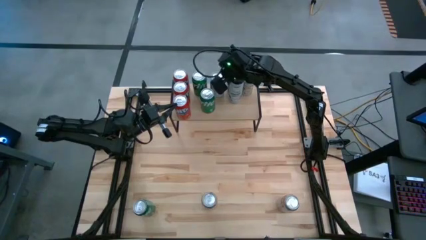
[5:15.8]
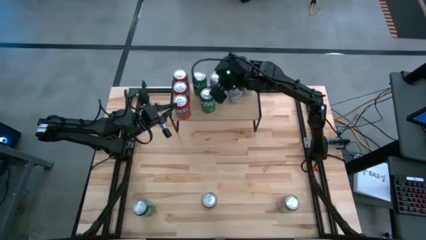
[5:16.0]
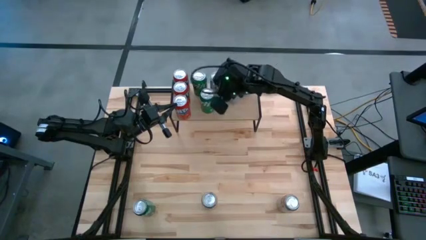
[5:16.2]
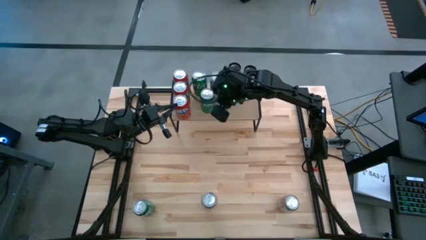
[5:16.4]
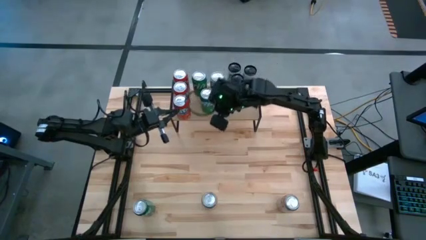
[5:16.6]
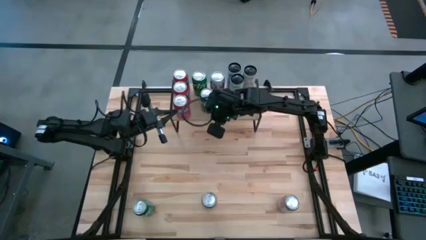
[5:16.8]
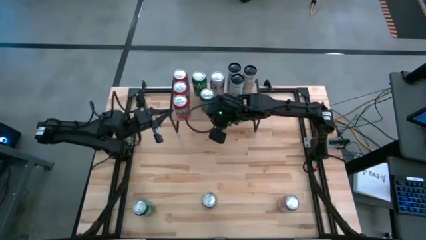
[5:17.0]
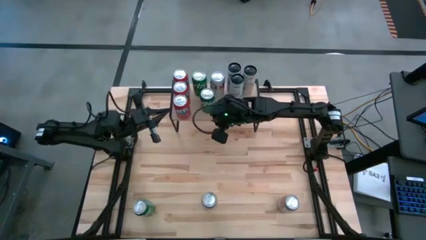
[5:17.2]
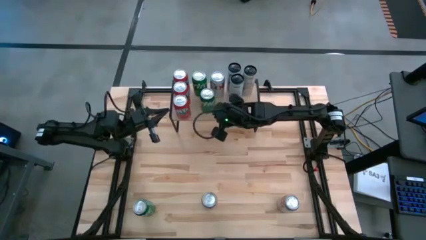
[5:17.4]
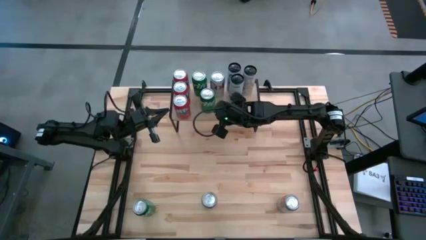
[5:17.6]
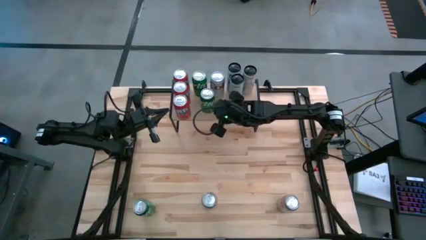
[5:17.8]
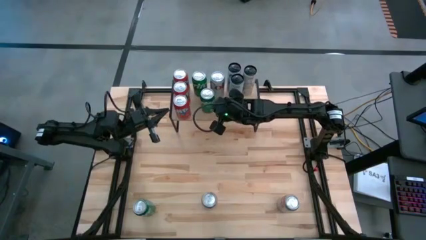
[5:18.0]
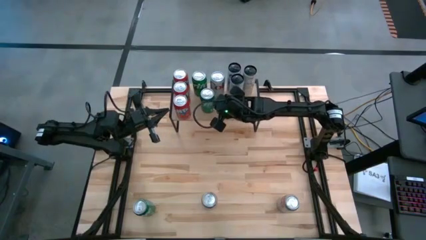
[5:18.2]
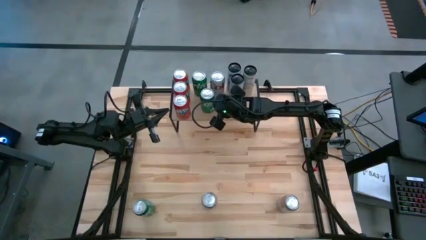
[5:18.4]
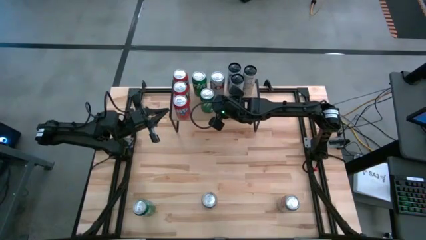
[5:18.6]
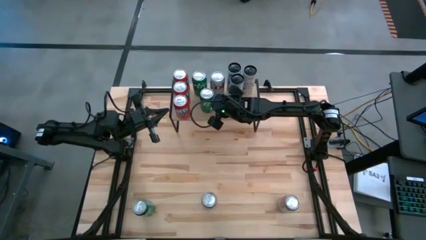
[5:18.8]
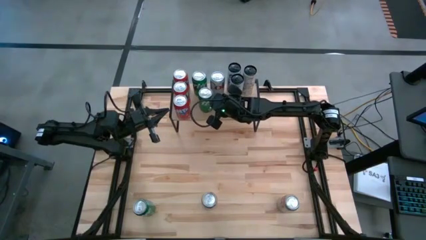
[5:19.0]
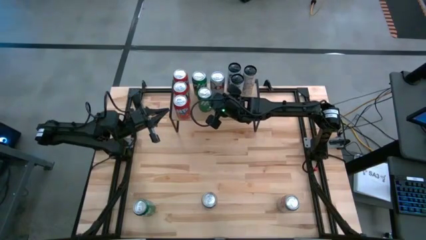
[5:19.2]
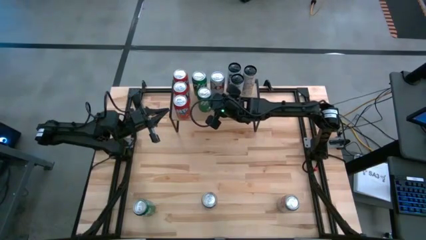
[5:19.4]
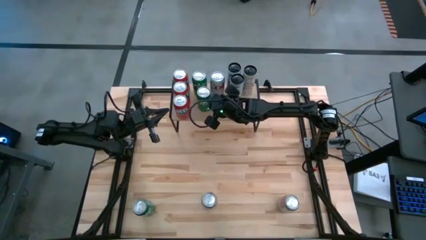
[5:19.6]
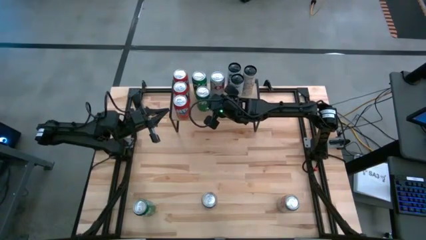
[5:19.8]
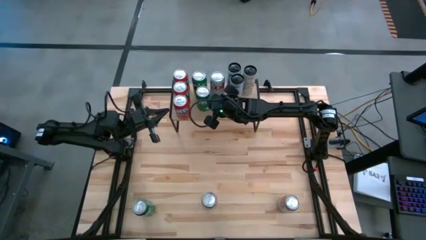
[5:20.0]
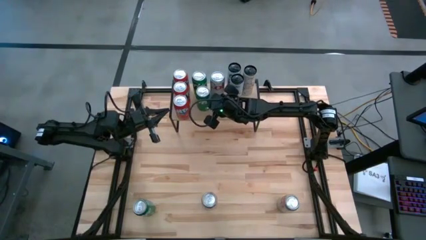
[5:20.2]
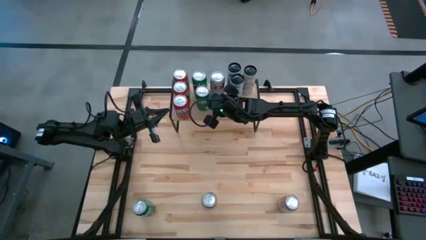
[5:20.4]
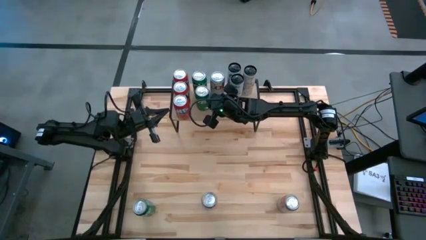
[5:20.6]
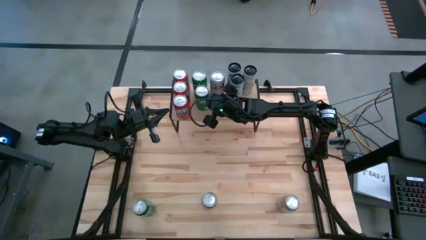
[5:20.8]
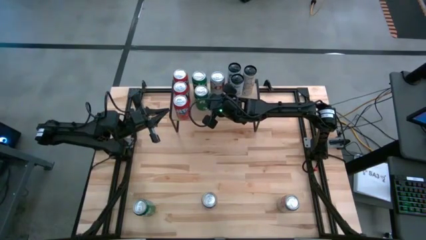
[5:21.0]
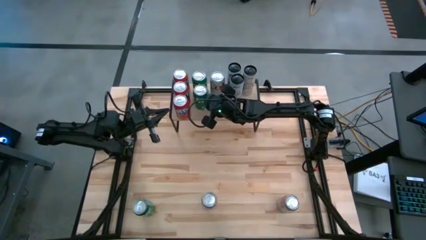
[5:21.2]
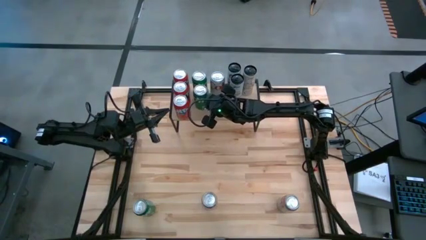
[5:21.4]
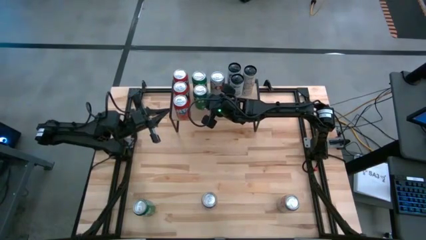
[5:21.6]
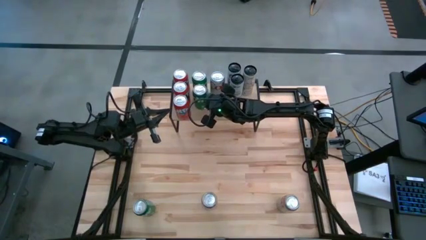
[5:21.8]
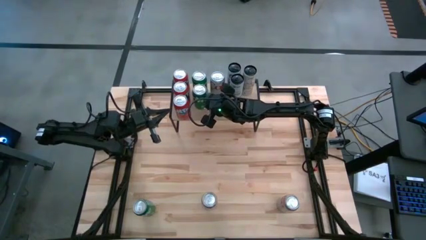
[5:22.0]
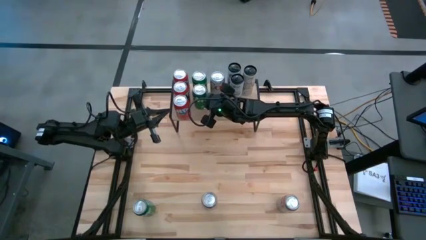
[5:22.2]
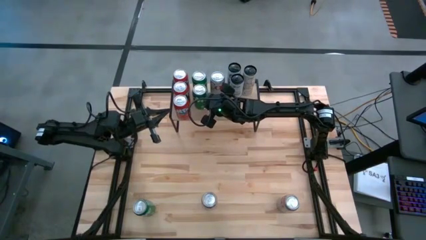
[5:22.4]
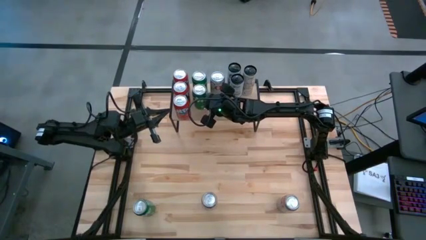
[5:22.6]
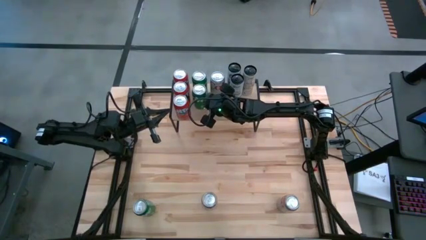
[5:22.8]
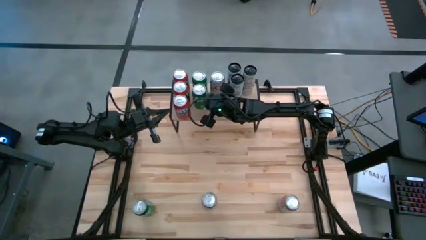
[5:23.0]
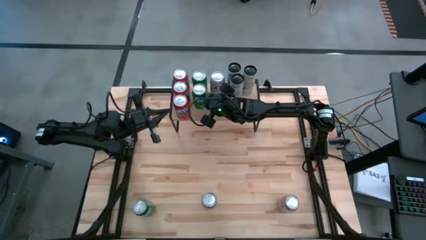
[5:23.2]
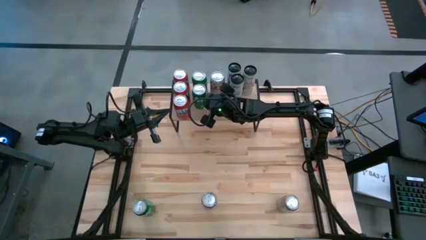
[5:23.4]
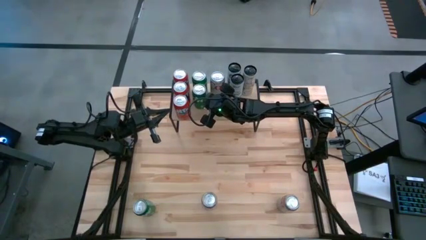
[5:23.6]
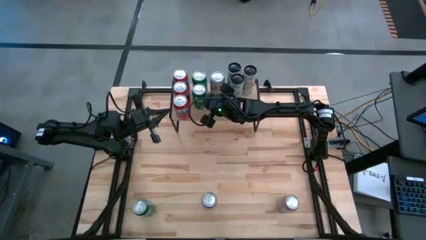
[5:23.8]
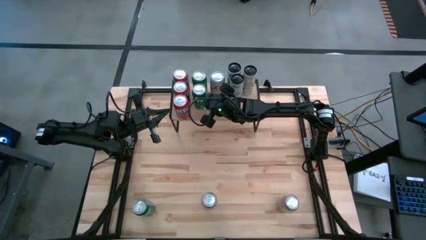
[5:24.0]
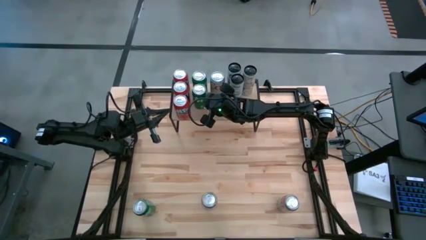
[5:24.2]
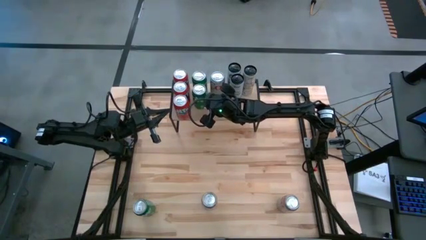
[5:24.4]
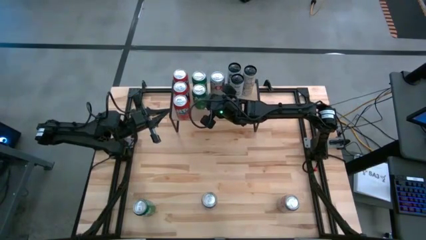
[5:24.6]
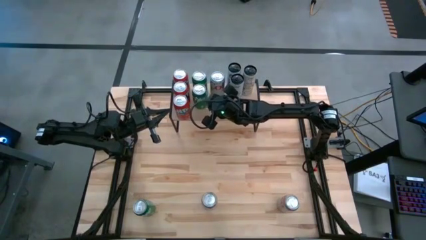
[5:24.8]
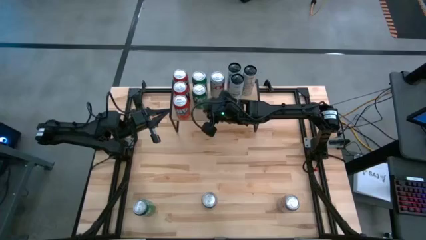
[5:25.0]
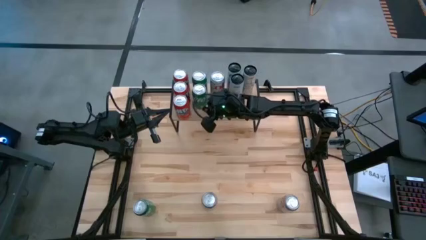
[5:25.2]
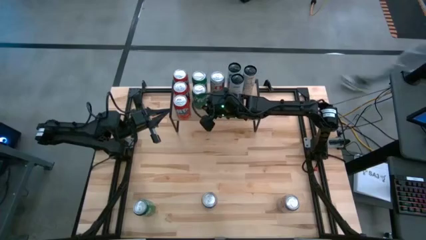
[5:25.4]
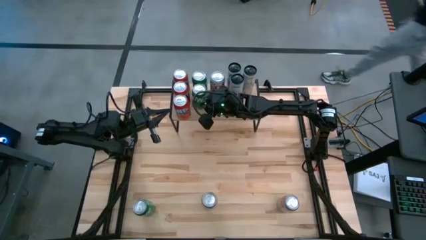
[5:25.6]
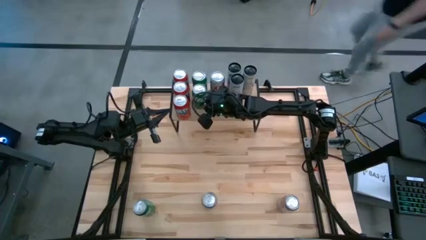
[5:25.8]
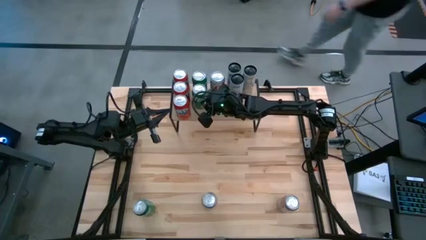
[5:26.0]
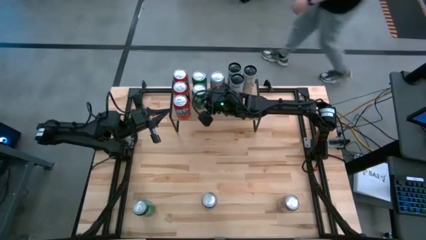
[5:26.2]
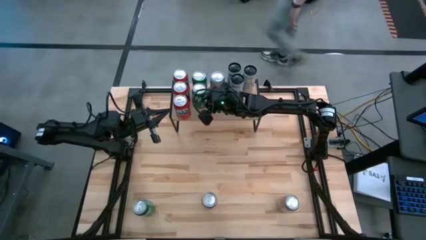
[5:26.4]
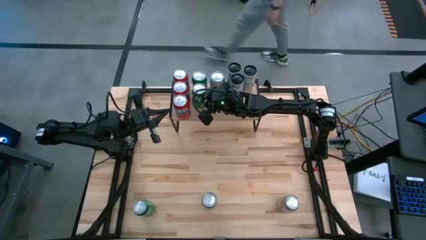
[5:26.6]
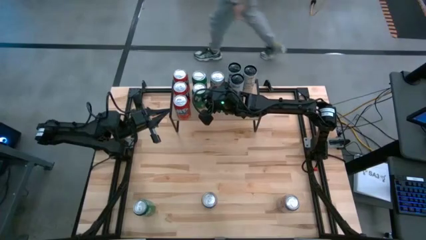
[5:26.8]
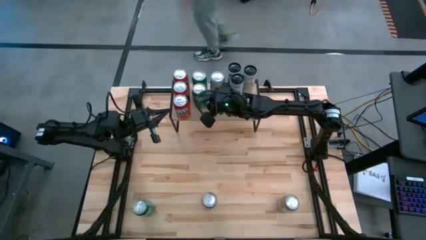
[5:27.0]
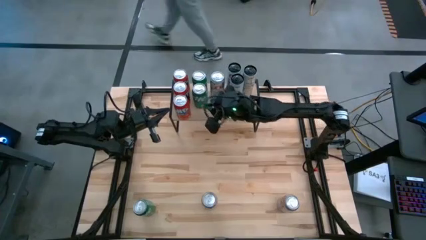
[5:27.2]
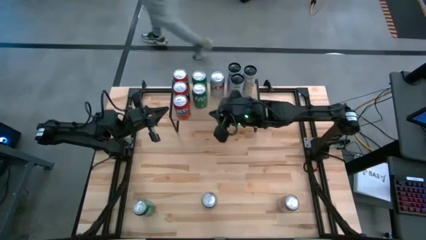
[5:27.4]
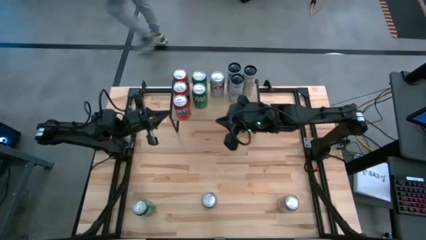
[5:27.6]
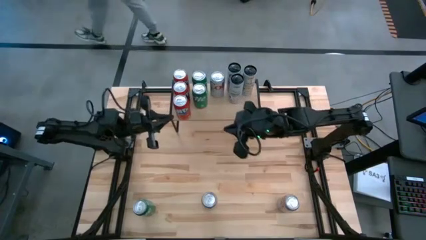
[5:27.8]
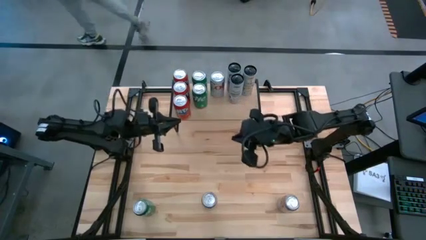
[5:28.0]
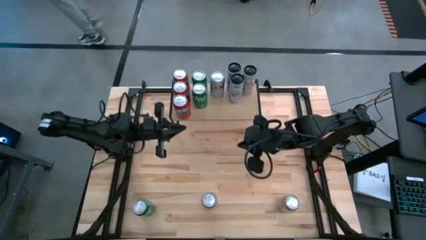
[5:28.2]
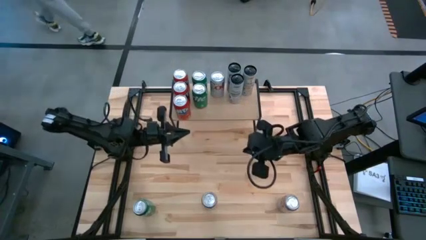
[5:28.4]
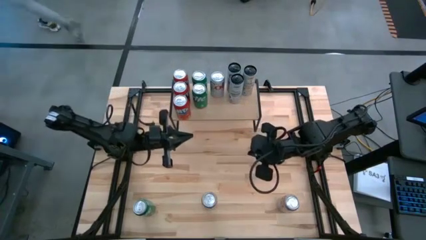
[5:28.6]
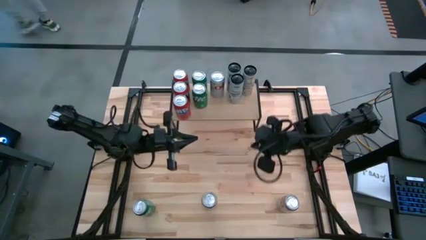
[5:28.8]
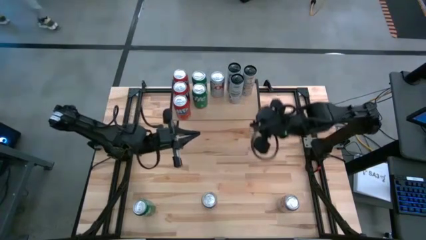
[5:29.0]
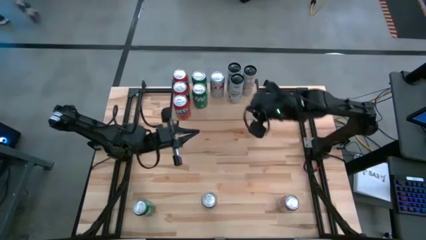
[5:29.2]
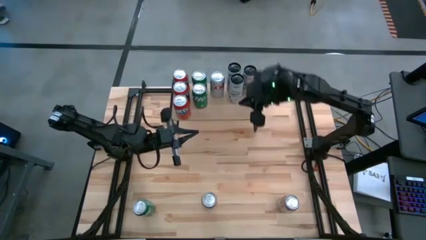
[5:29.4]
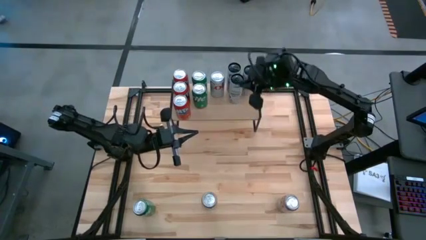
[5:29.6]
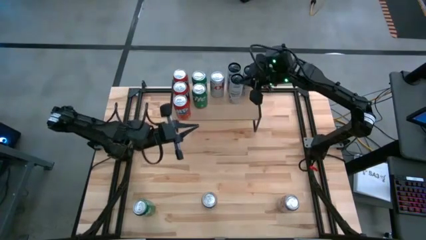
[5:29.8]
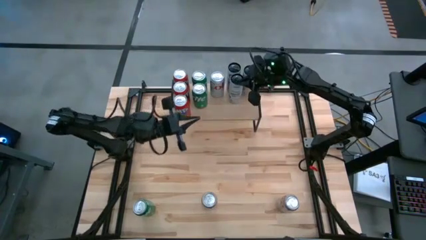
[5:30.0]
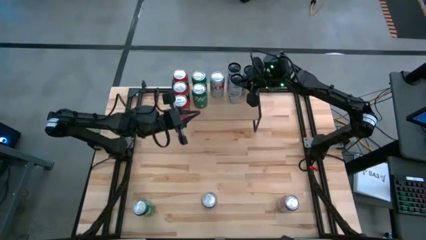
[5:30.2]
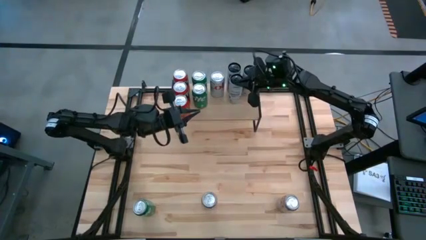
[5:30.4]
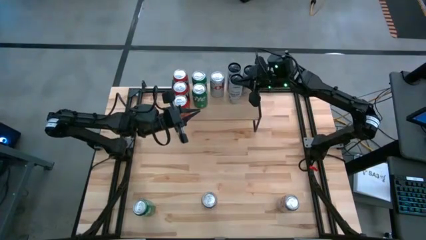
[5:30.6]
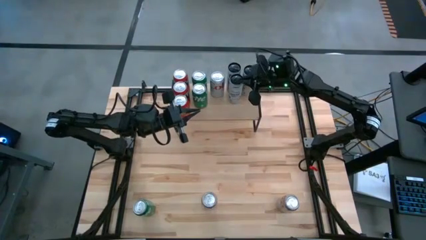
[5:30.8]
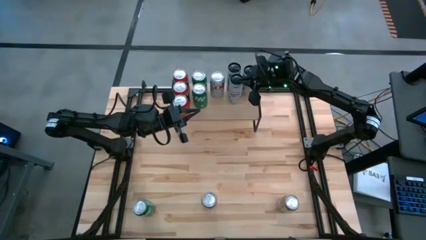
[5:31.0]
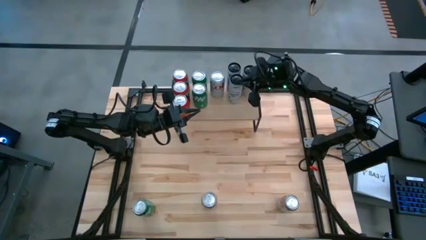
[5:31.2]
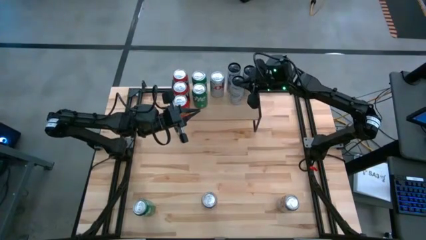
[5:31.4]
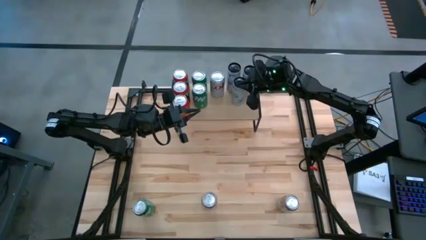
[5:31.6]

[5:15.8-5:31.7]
Task: Place canned beverage on shelf
Adjust the soda cans on the shelf
